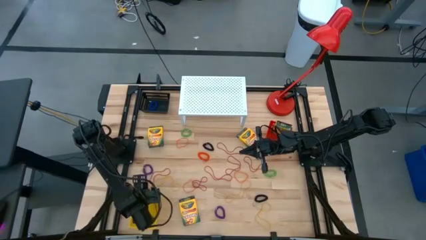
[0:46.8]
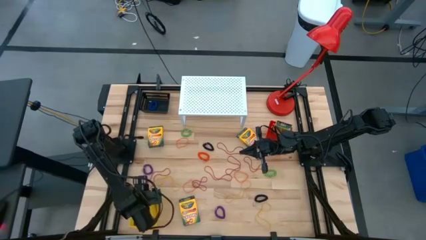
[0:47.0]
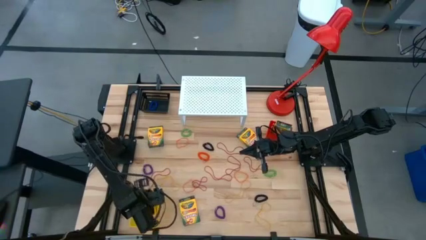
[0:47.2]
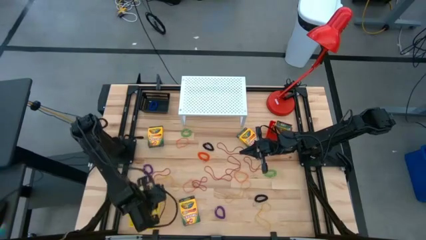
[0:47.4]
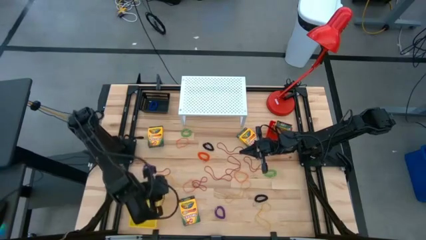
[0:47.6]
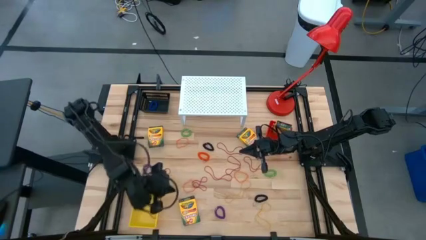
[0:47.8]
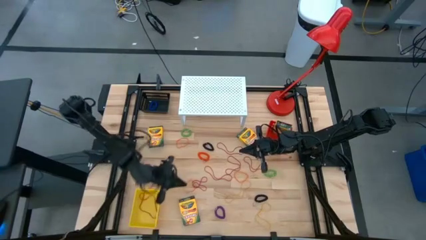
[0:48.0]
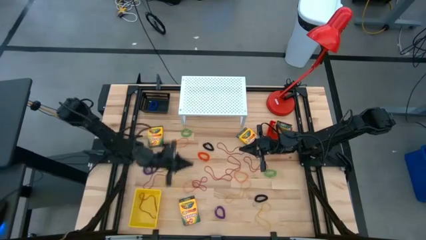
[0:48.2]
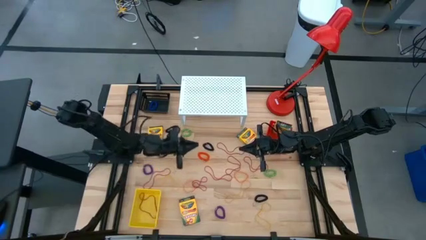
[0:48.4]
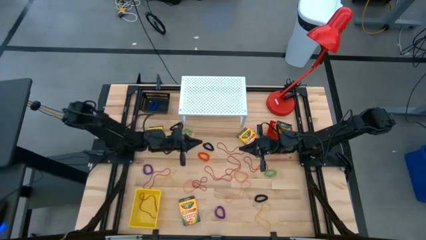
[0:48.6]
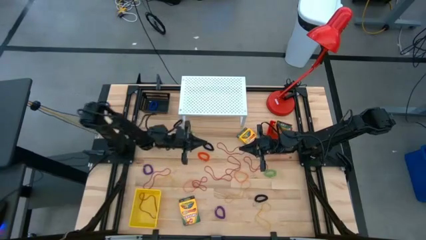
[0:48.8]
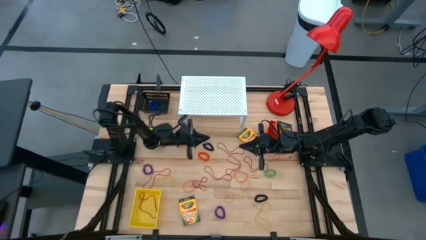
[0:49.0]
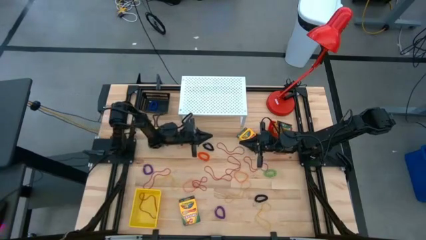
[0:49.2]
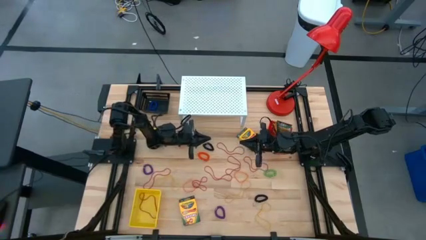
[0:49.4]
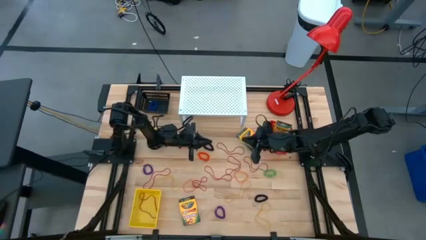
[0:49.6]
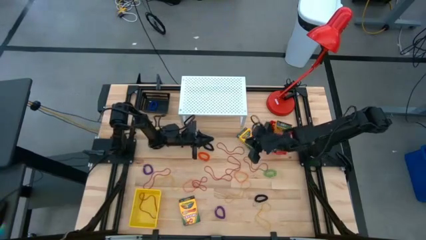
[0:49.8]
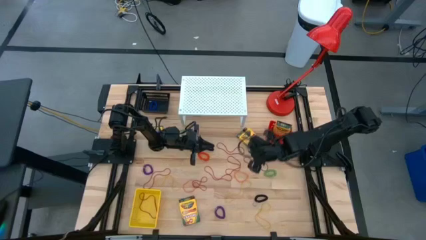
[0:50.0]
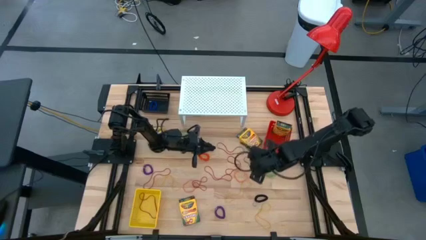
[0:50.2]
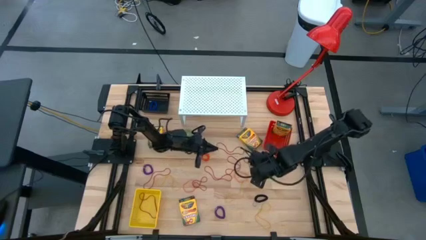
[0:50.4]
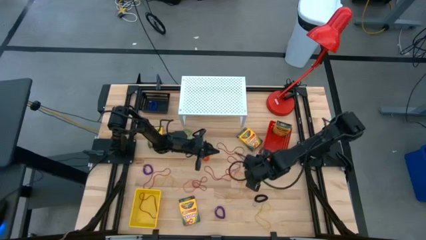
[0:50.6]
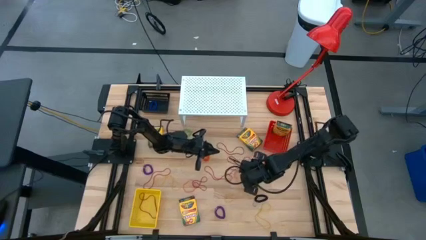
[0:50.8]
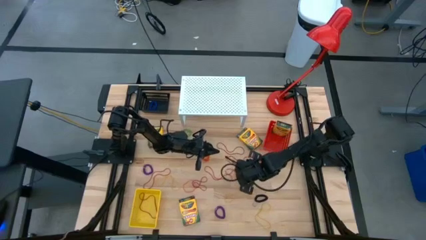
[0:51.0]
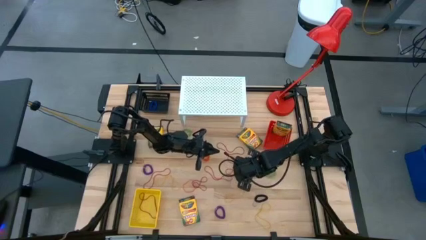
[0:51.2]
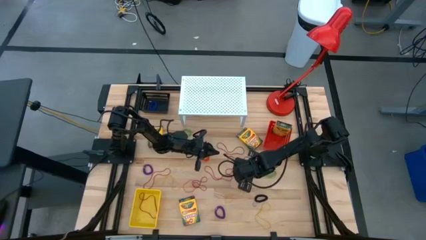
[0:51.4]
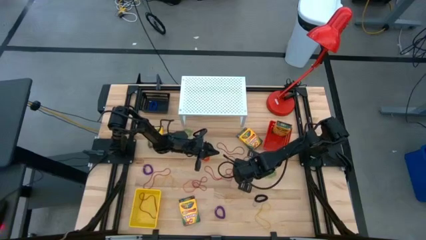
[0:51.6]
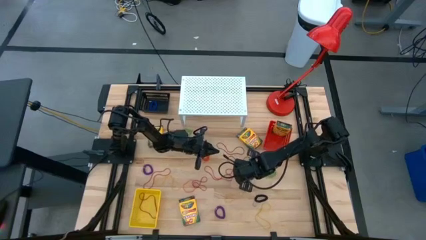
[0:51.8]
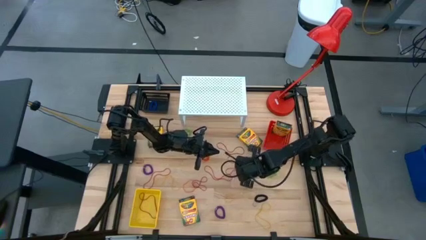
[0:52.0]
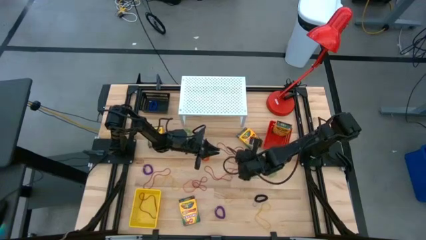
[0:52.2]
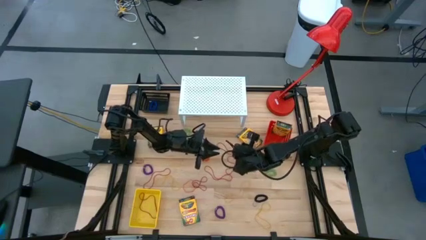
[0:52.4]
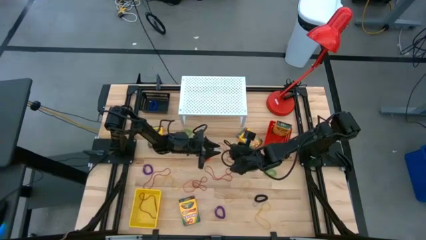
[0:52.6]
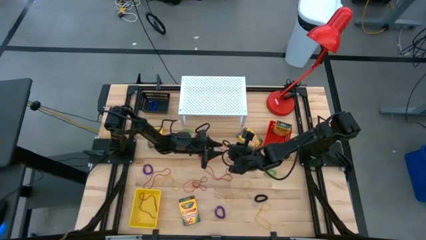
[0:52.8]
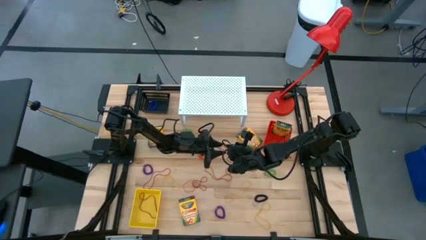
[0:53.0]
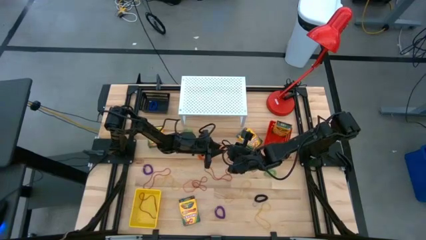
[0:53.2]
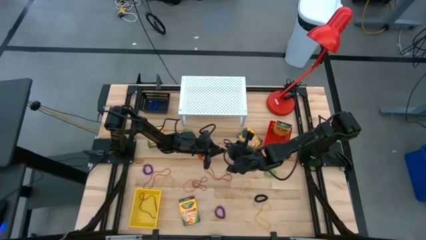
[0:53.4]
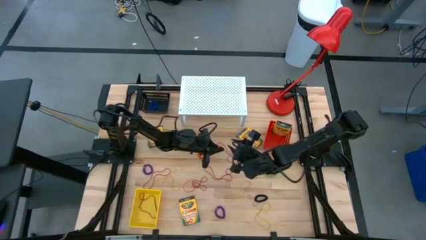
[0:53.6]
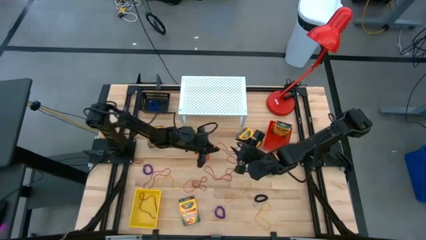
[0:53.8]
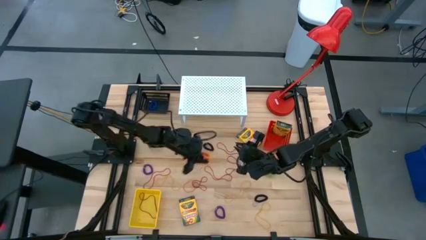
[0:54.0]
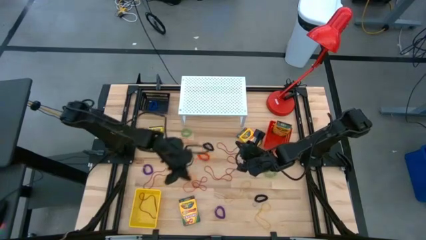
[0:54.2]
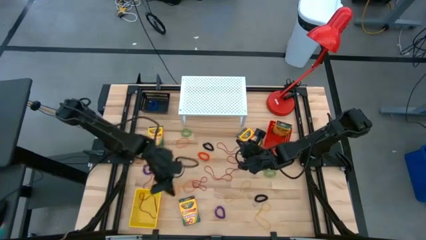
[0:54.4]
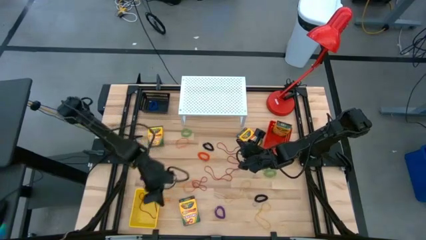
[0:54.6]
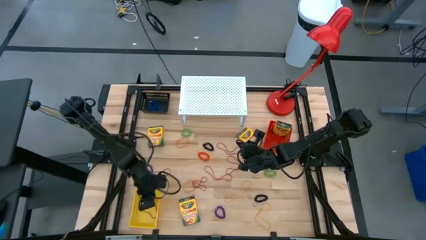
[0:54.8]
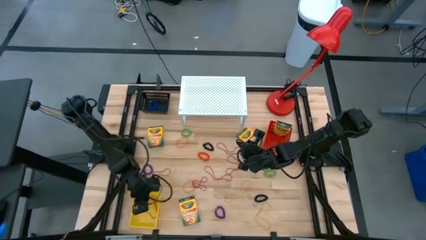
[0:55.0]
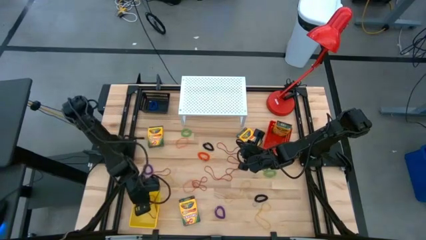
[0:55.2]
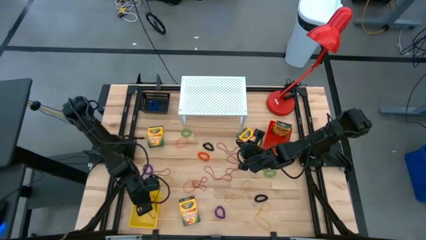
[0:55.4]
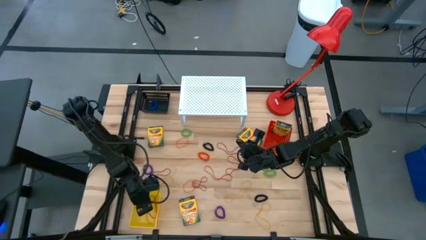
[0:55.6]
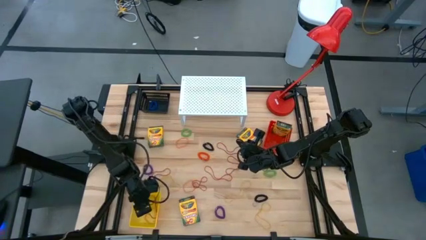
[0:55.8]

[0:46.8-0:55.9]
Task: Pick & Place Office Desk Supplies
Put the right orange rubber band into the yellow bin

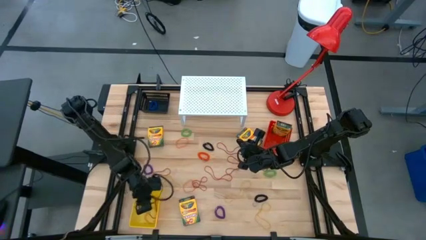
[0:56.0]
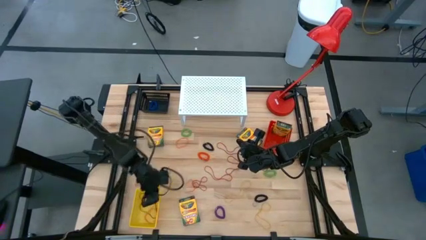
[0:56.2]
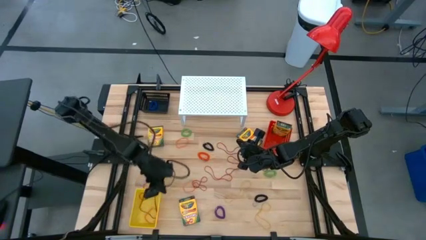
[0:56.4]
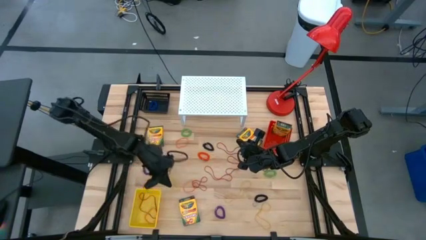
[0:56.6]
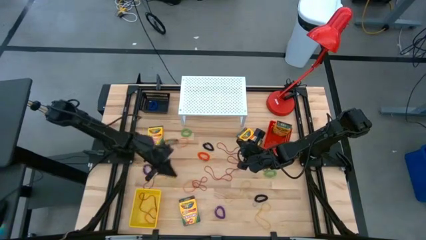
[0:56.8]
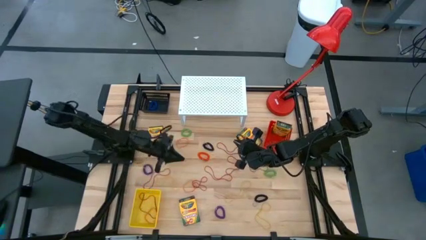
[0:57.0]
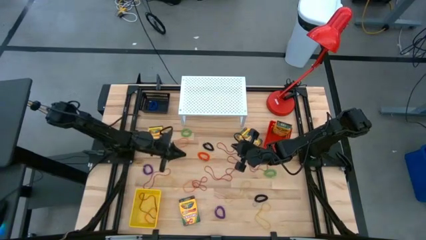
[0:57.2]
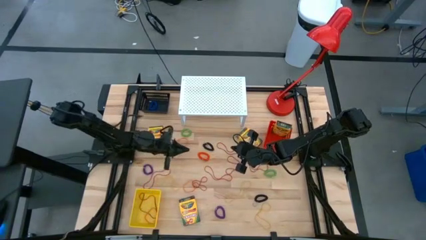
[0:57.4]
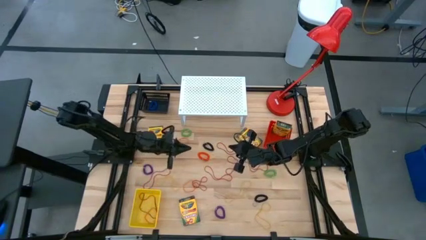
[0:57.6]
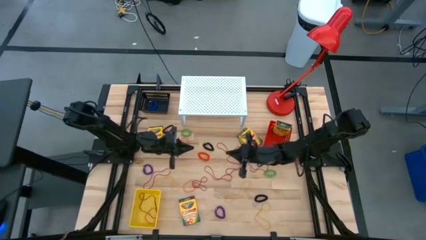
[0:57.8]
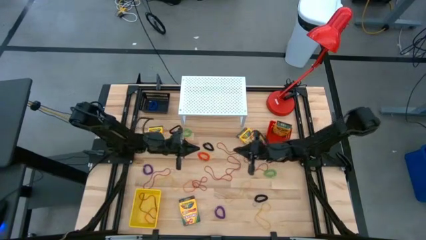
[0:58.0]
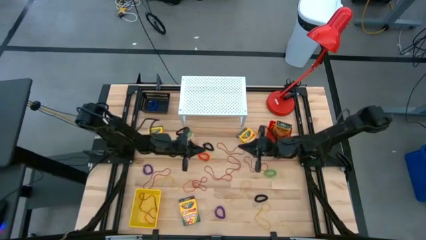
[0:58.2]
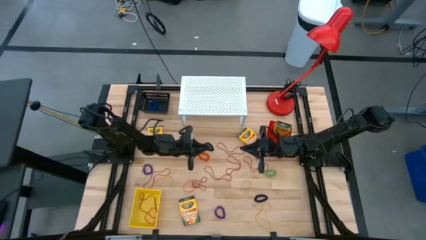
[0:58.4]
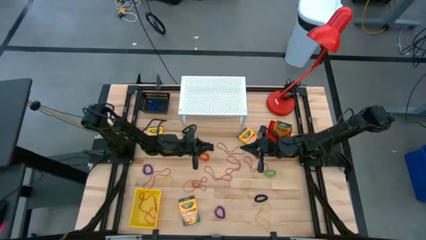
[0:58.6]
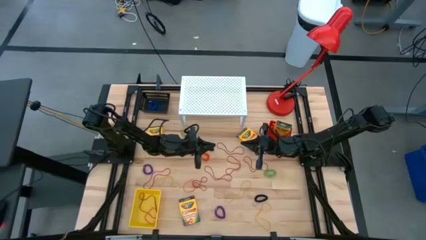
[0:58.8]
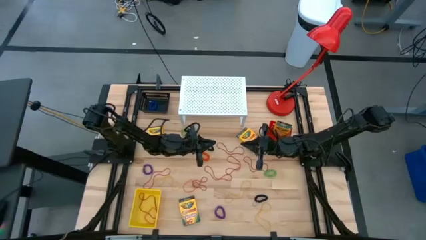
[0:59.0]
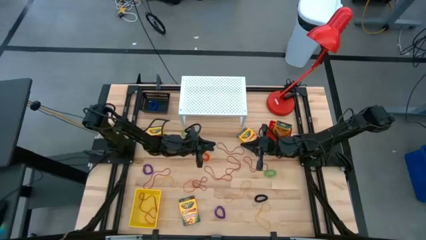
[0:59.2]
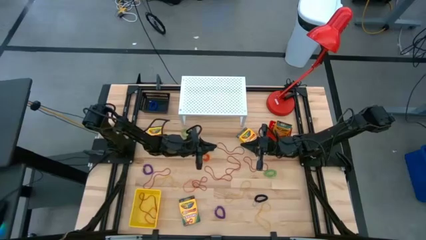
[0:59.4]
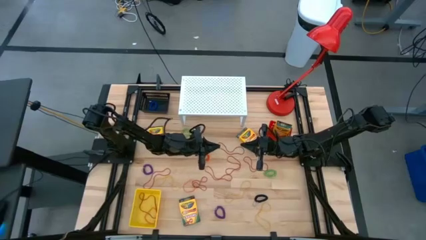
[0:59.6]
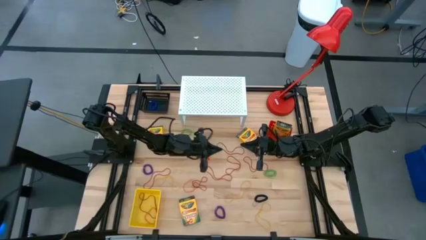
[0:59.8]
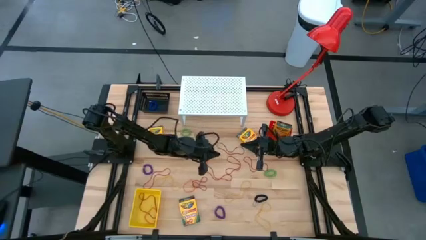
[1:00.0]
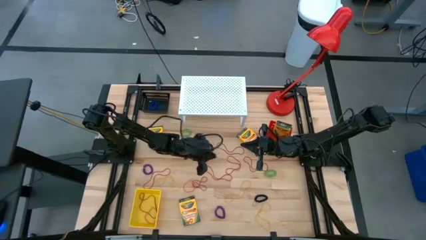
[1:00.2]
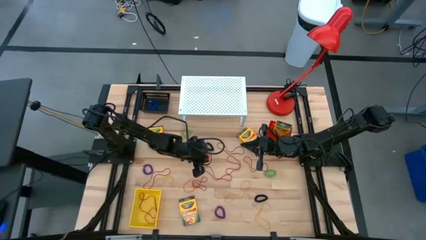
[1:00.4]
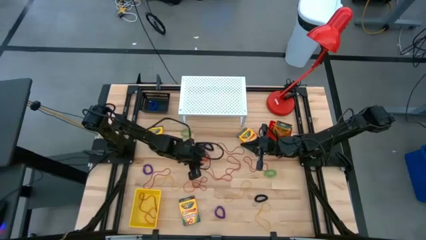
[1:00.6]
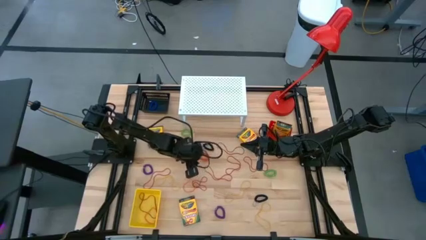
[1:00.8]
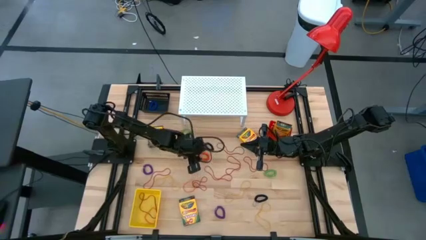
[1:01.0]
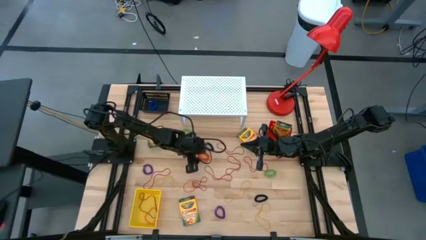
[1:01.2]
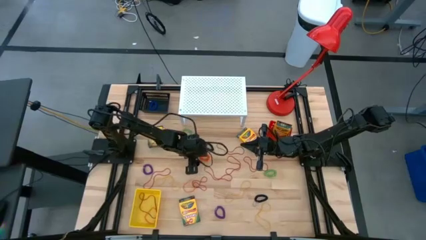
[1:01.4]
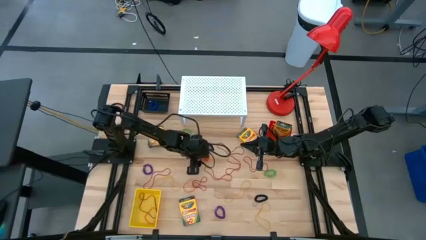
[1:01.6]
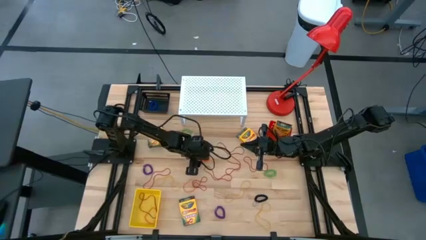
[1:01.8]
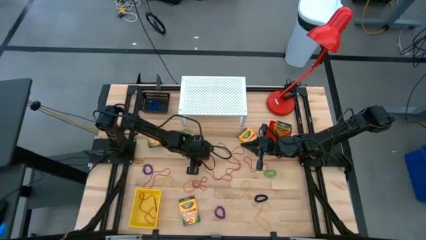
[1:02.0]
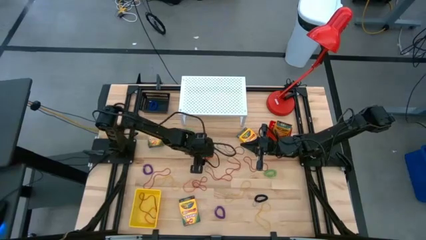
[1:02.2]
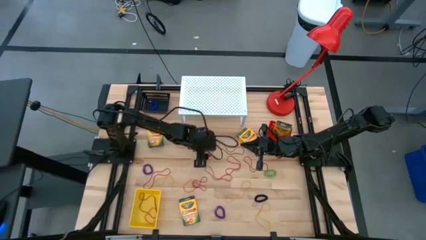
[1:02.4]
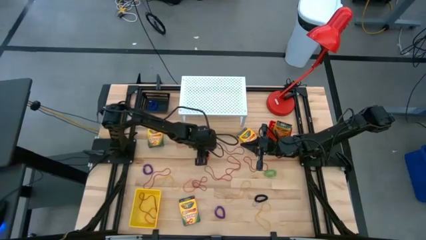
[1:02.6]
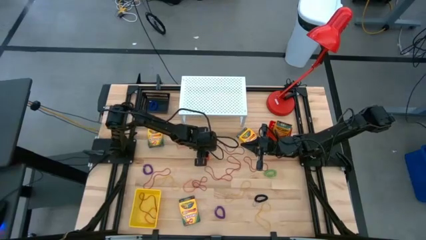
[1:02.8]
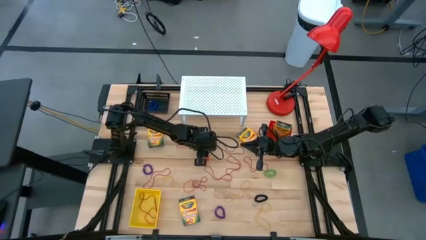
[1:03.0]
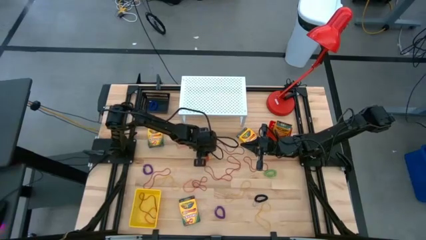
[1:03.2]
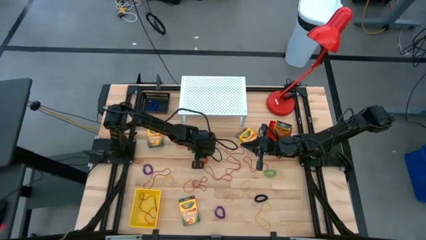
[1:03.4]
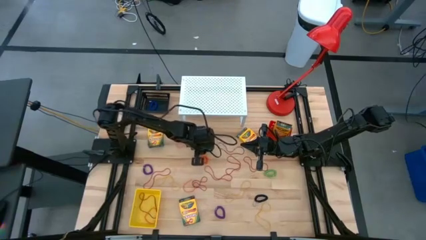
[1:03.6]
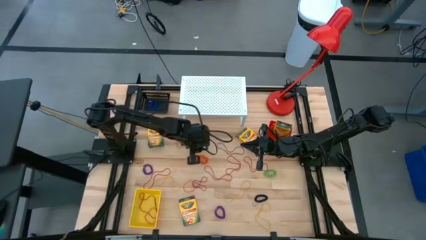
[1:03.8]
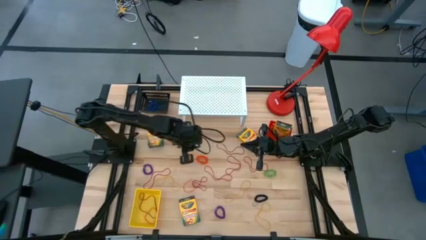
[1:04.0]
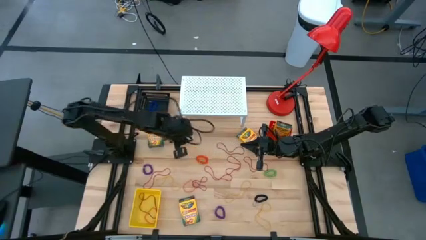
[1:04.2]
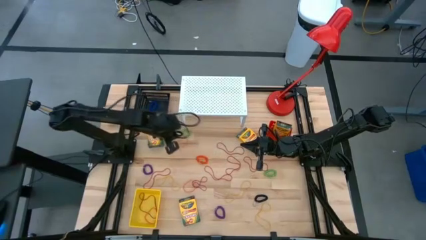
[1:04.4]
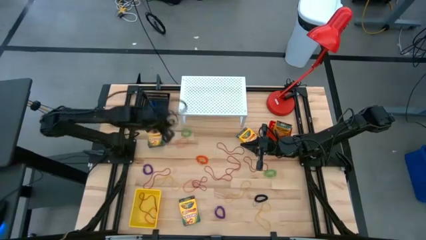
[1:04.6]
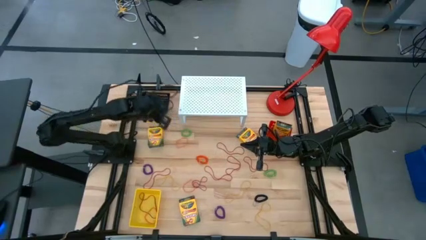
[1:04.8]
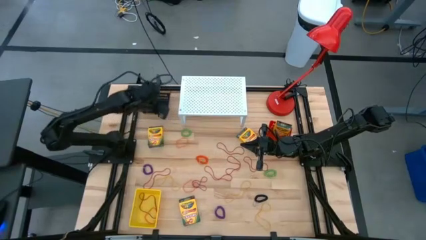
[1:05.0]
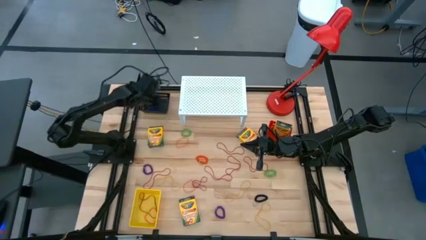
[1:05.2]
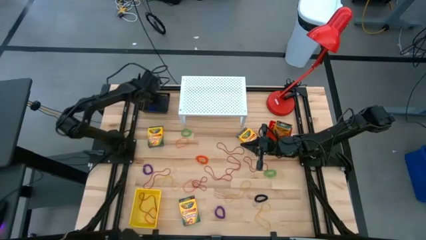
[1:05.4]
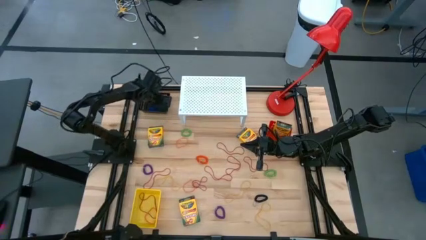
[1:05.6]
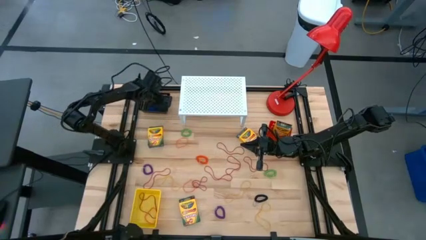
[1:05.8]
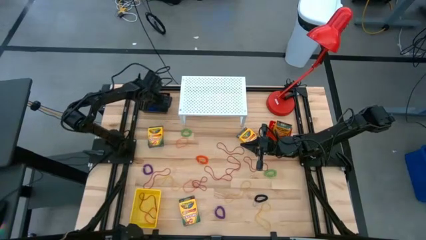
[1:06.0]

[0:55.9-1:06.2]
Put the top black spring rubber band into the black bin
